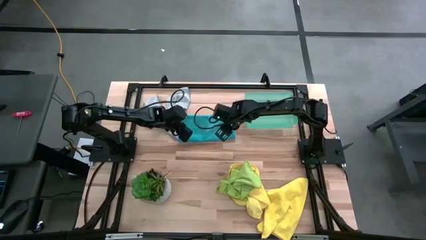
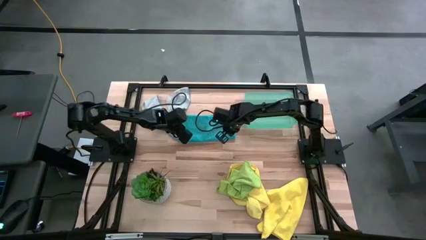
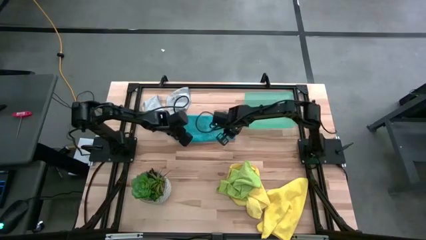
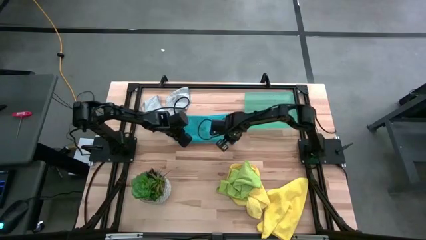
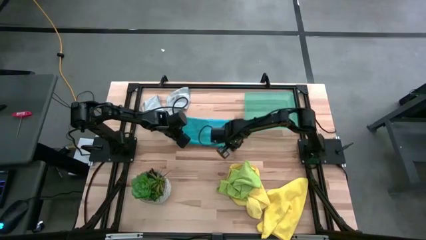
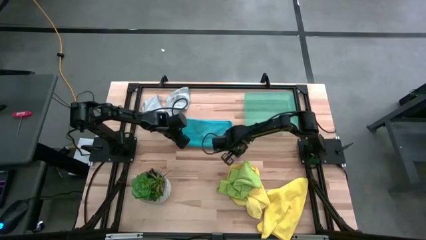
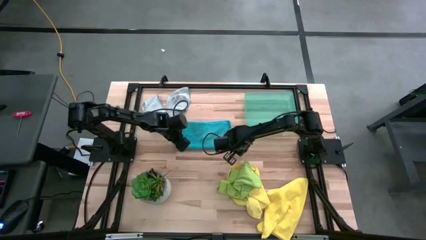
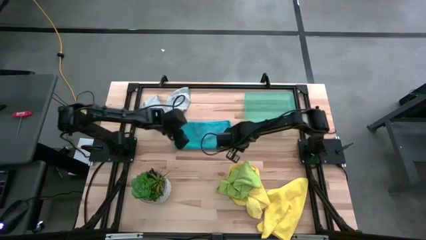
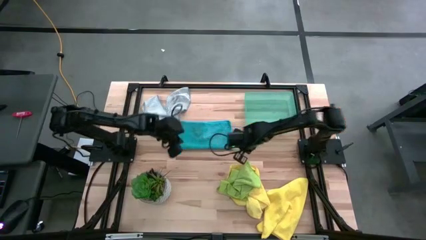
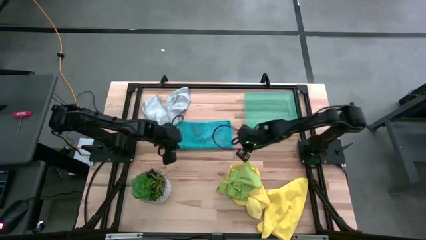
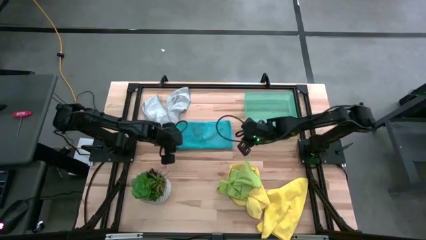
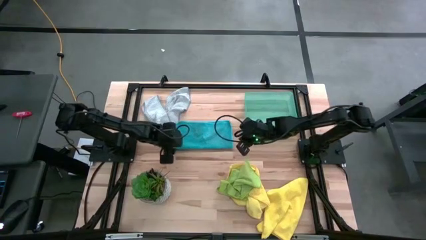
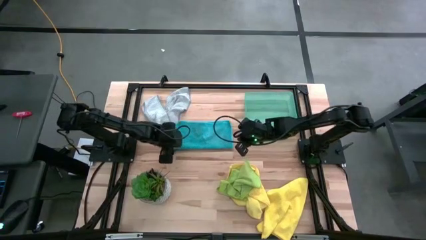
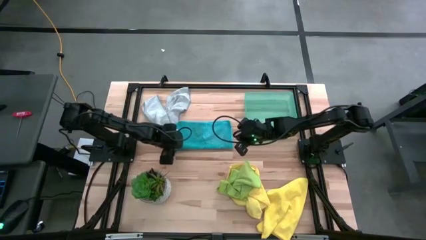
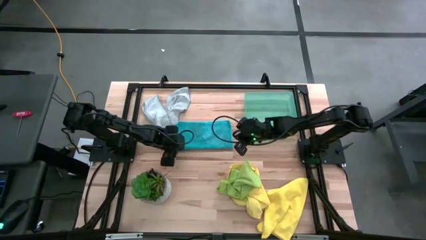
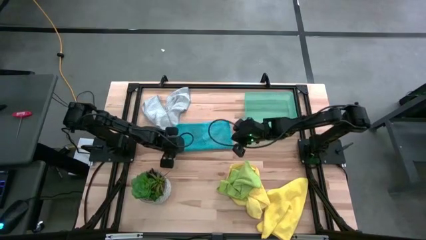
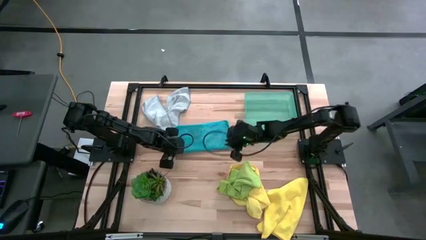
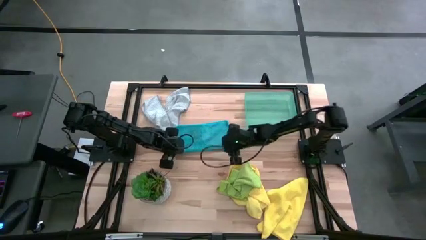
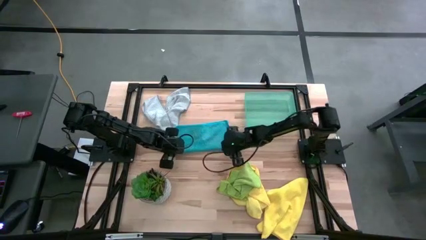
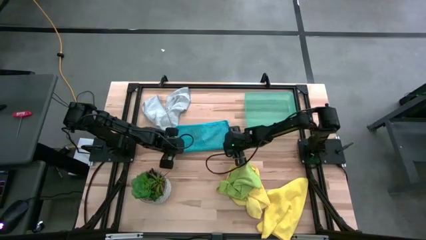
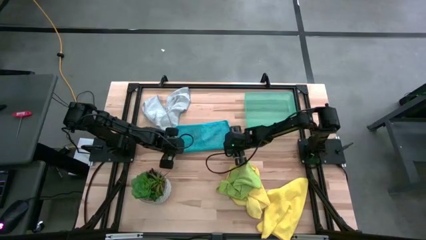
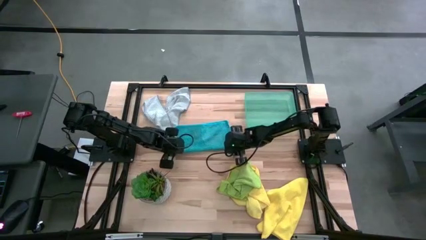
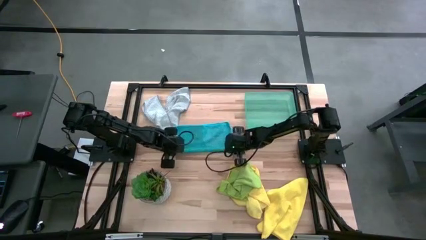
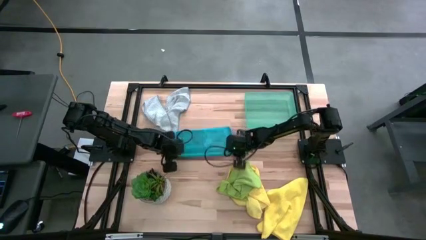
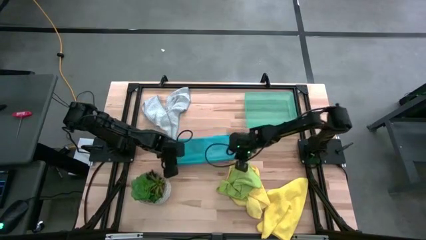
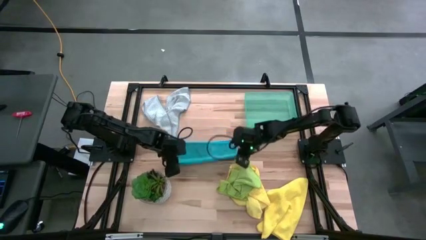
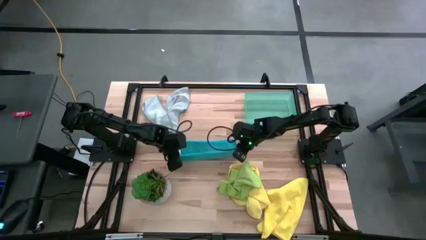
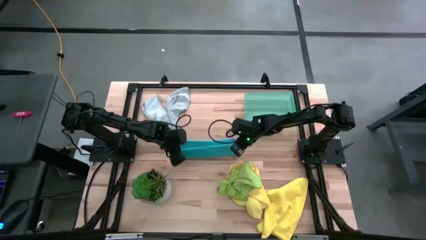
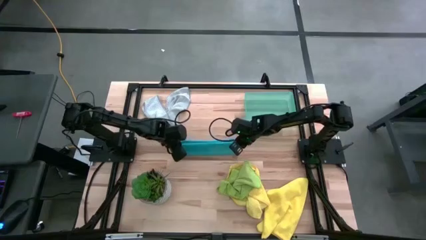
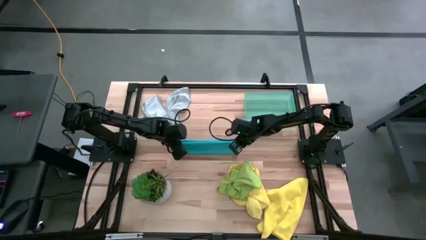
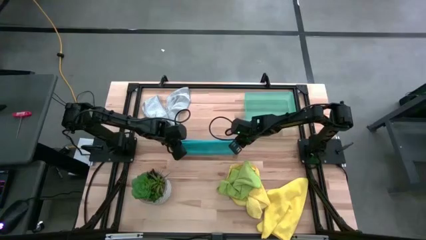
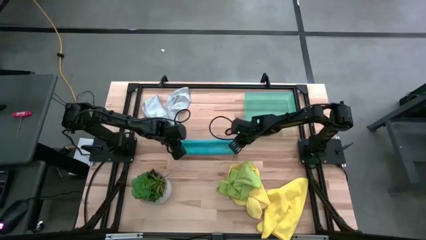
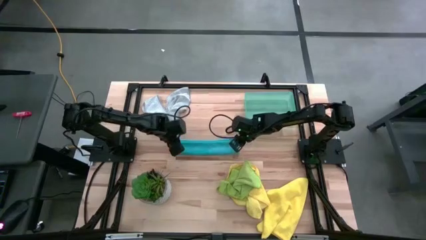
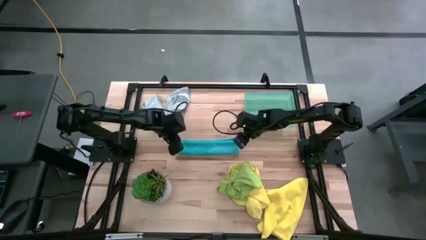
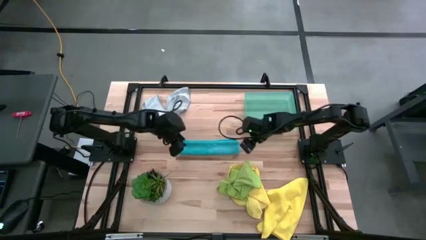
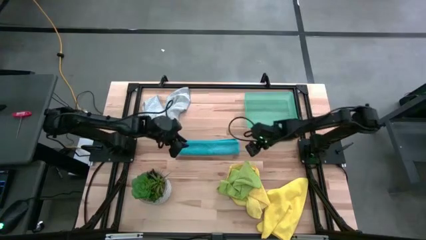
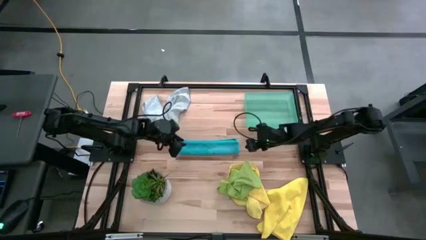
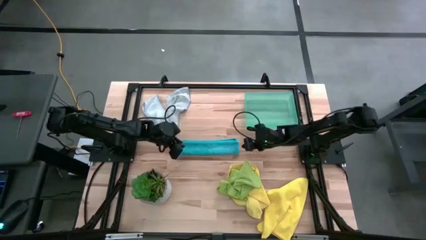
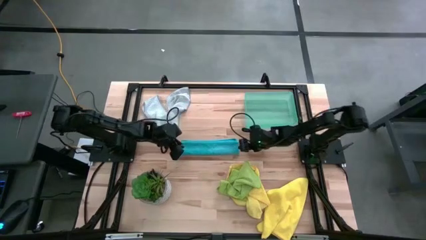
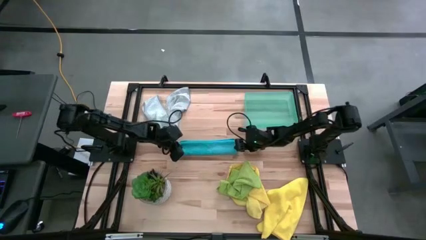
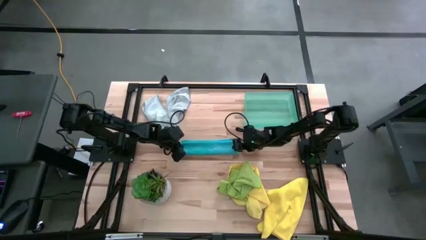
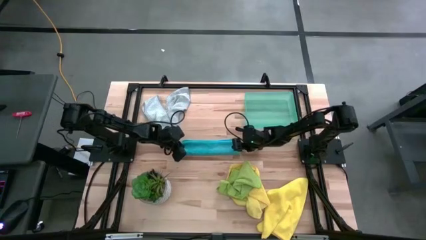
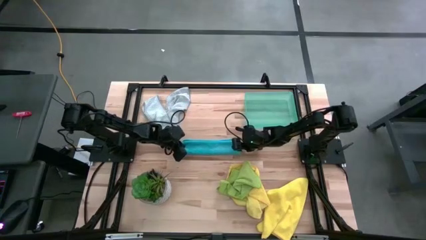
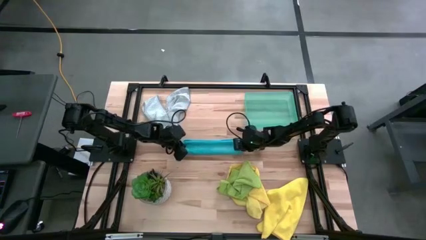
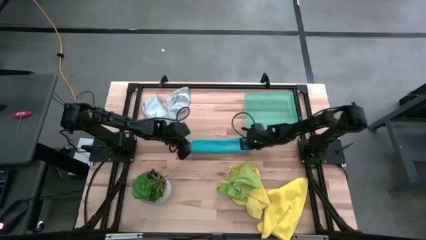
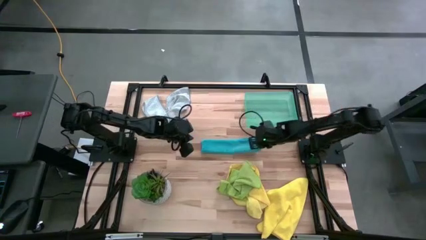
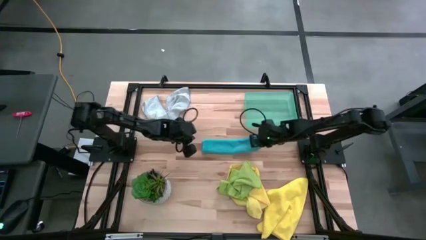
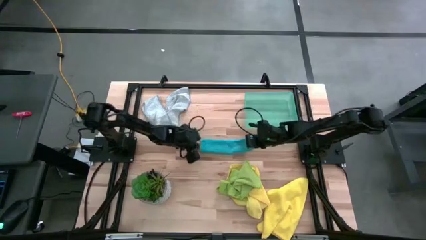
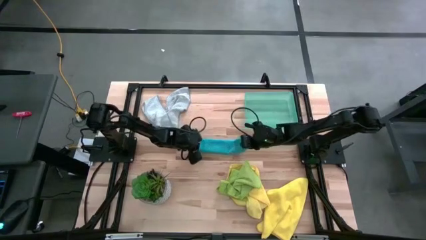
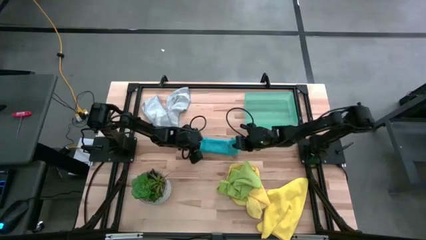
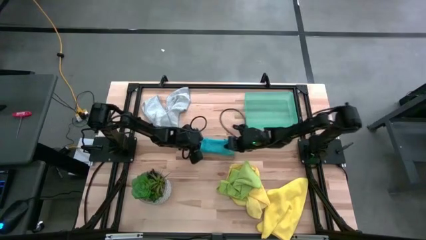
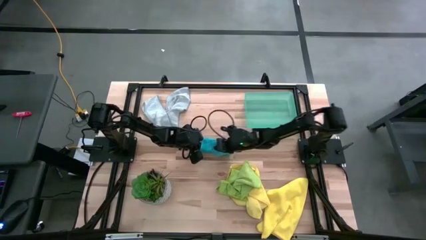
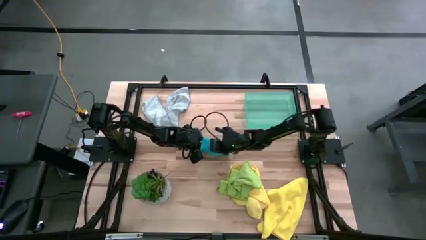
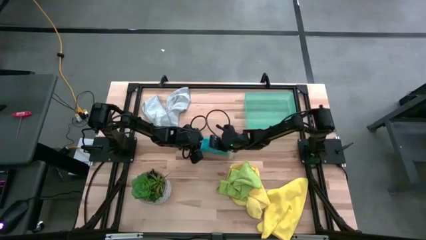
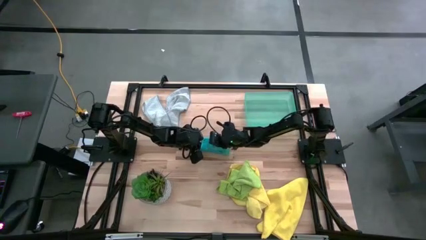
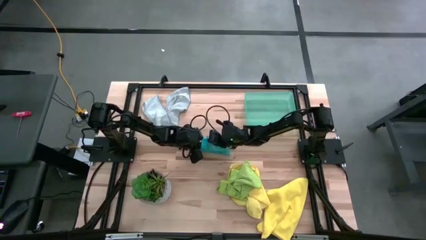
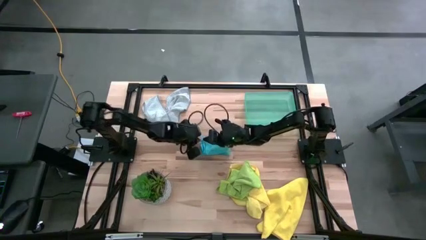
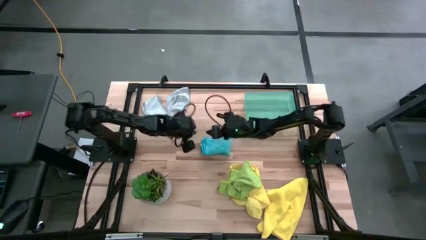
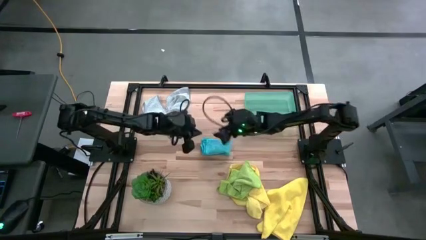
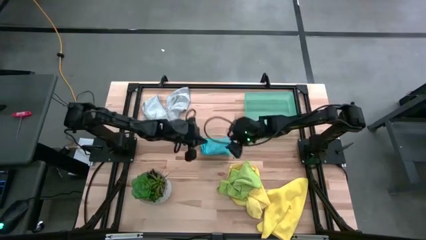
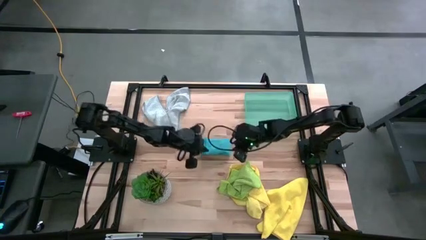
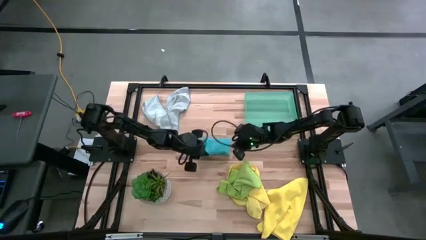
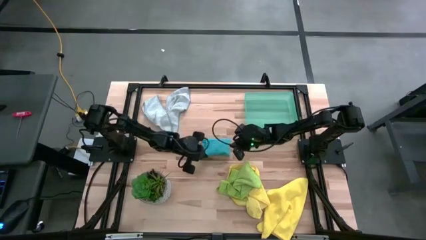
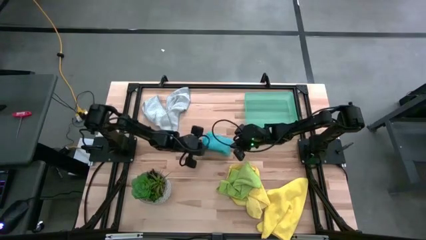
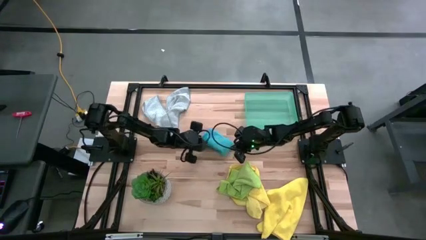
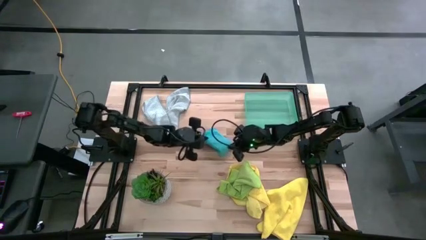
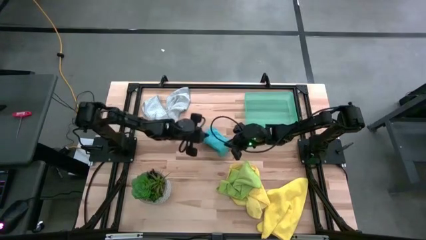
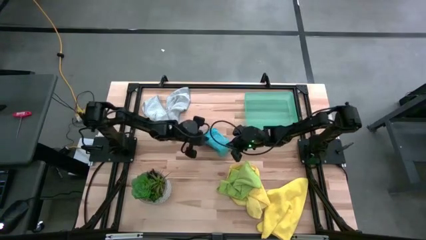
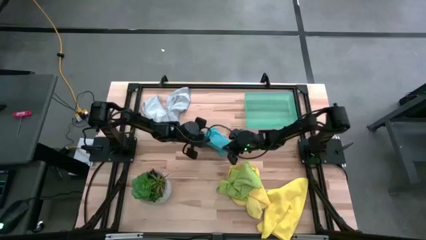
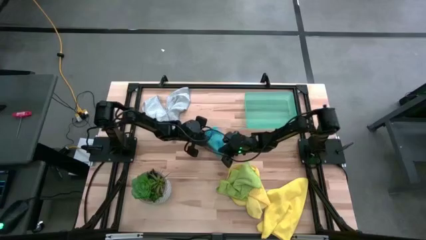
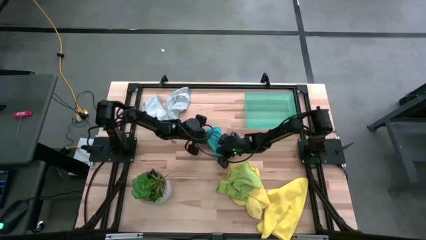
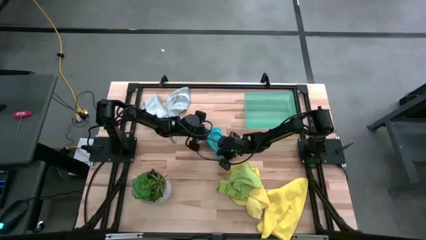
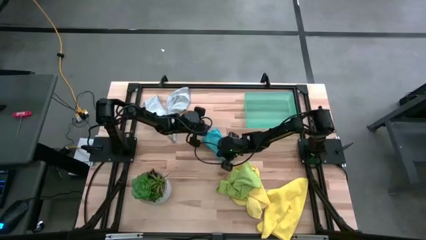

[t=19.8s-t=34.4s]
Task: Fold microfiber towels
Fold the blue towel
